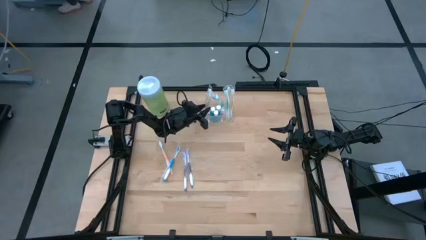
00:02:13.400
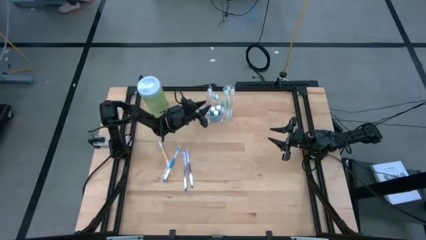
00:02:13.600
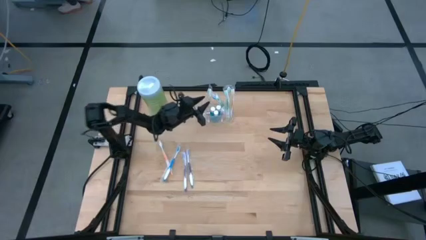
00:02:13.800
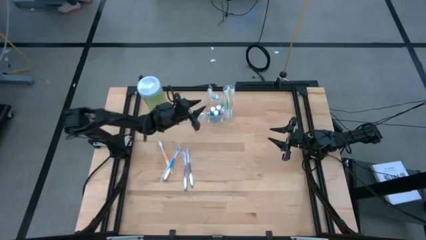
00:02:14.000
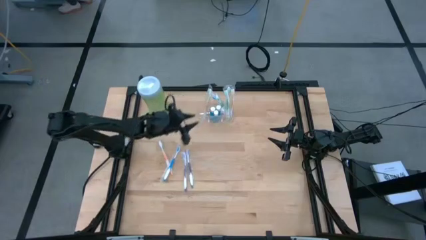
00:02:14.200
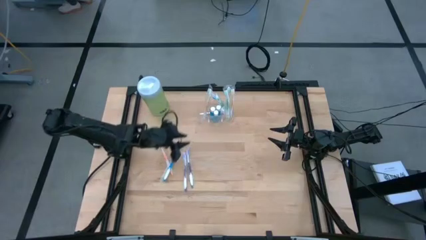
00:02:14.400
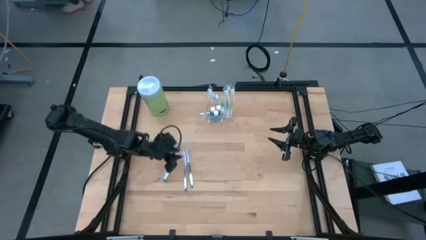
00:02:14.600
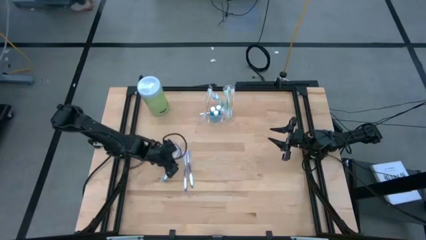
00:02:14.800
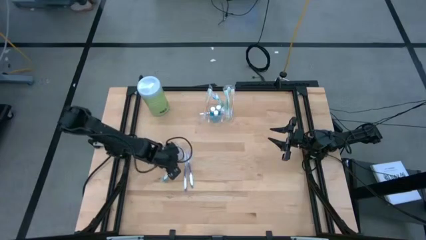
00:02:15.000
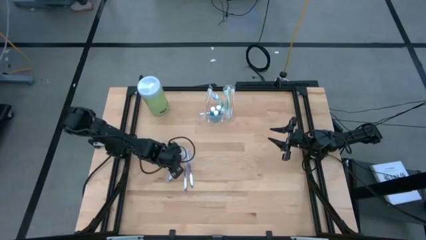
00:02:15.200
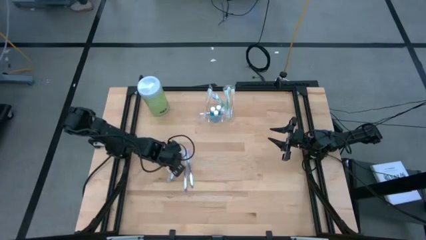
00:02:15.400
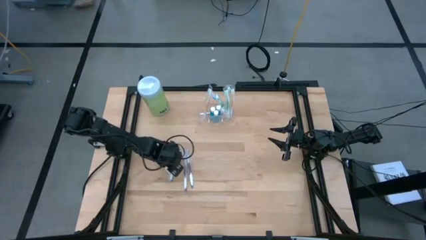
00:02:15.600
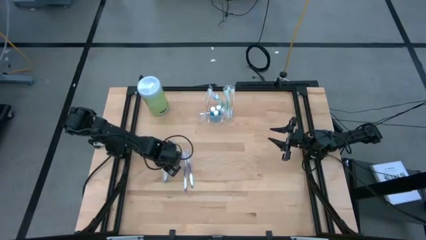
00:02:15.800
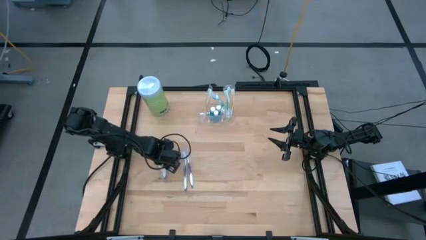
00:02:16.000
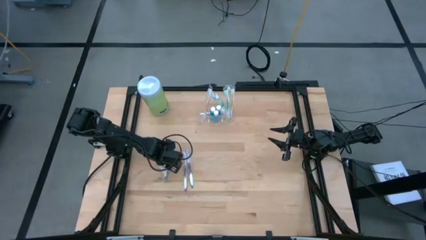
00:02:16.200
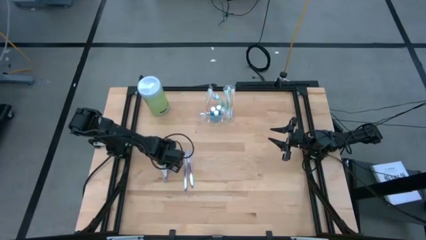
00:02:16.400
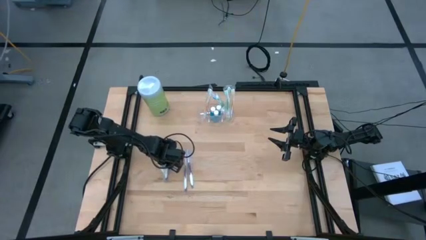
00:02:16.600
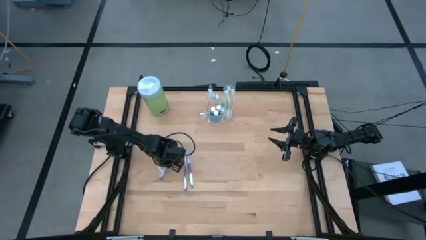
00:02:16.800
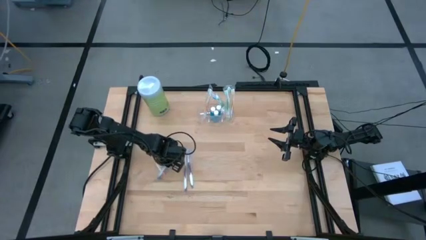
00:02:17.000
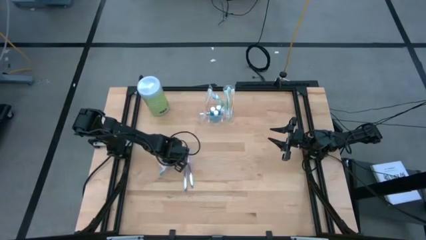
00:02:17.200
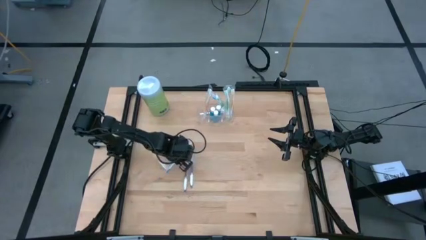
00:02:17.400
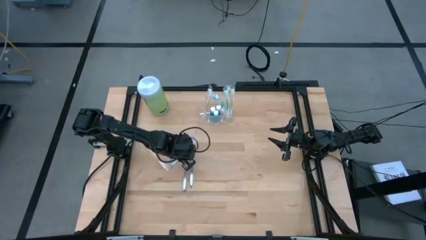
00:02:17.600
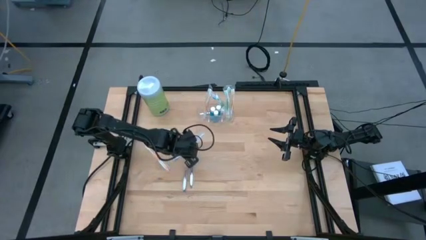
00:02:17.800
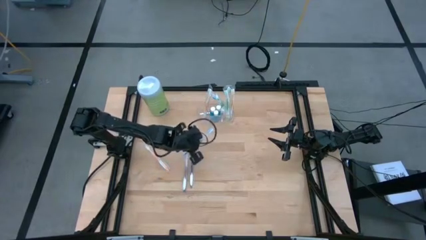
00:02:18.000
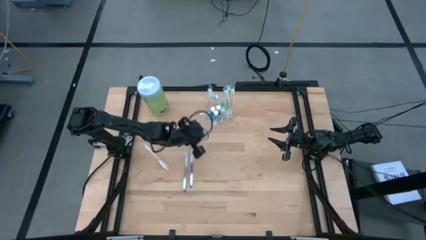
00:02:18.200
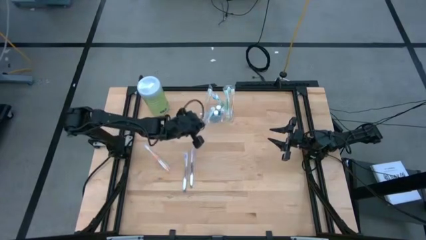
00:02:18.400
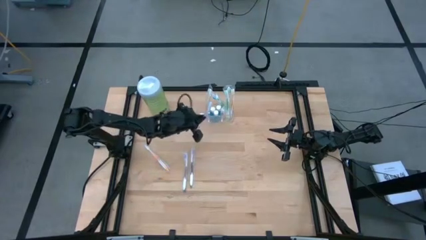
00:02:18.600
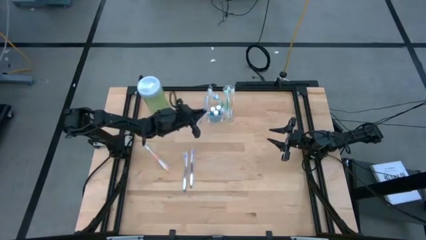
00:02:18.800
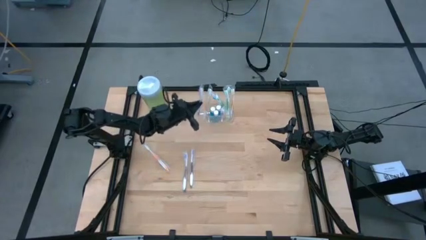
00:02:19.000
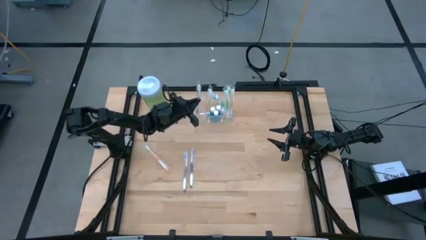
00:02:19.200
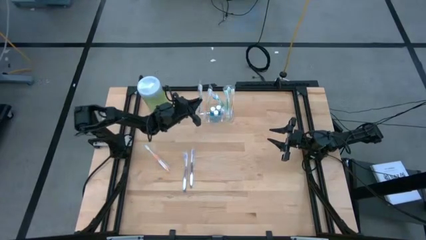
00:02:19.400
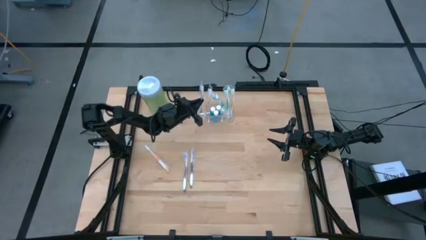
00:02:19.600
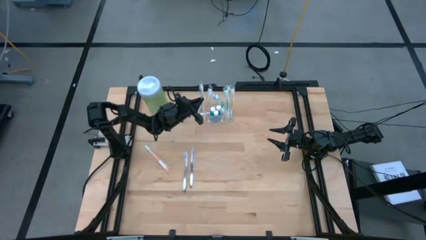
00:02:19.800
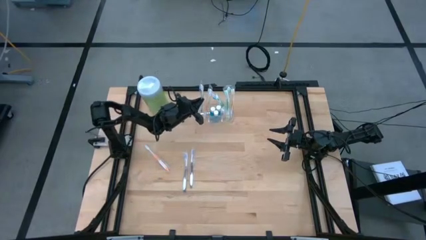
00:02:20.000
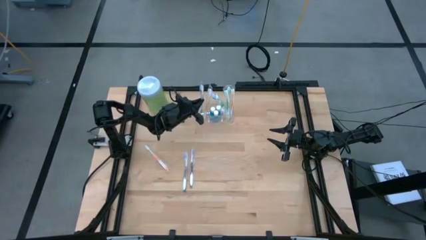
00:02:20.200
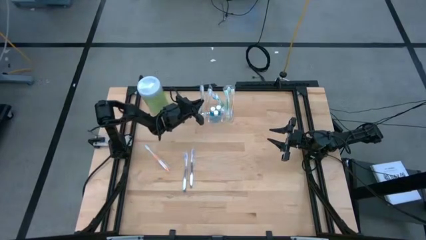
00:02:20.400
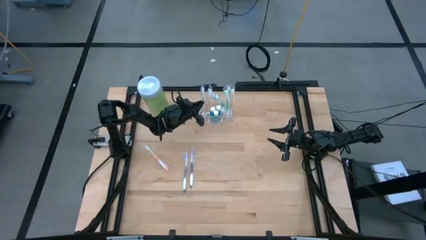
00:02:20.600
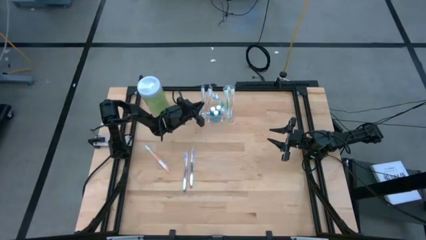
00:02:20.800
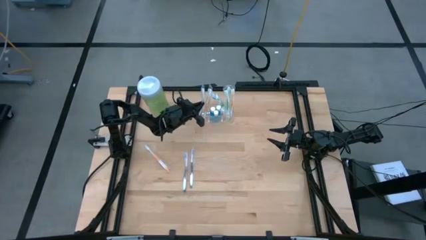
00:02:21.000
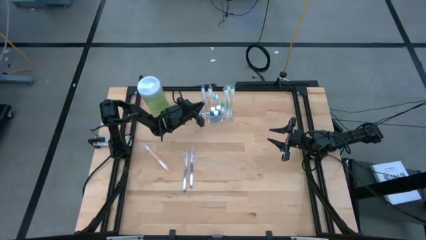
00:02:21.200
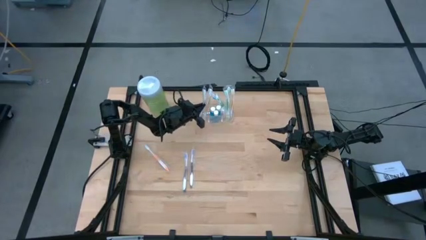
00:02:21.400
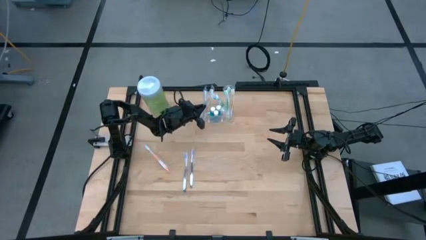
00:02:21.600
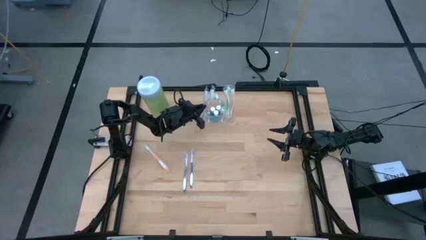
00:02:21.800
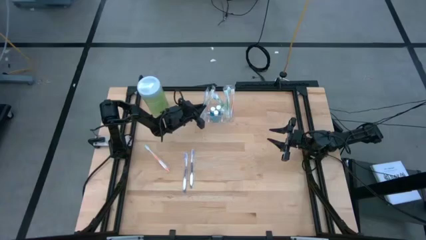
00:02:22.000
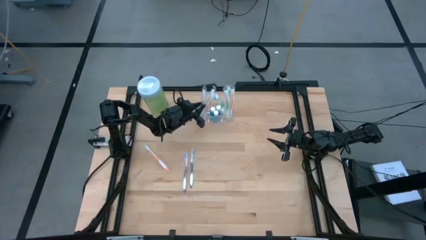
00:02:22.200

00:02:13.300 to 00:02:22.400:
Task: Pick & Place toothbrushing station
Put the blue toothbrush into the transparent organizer

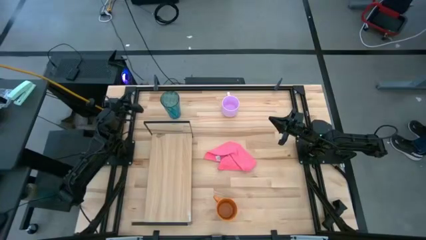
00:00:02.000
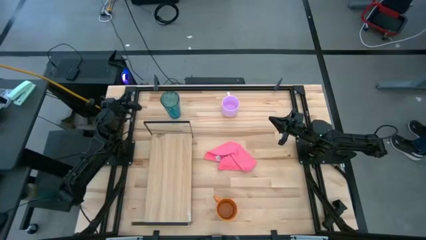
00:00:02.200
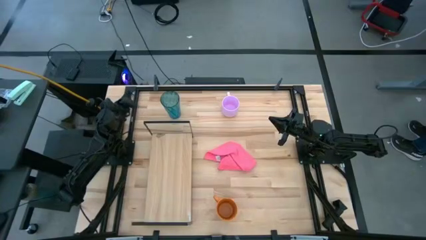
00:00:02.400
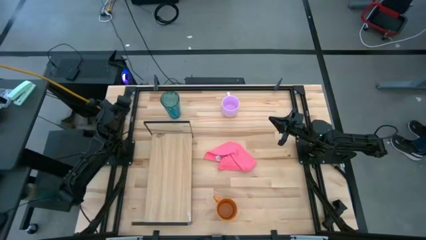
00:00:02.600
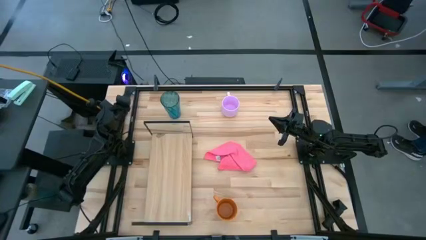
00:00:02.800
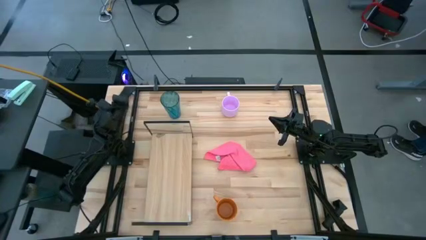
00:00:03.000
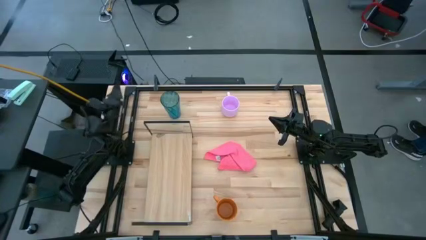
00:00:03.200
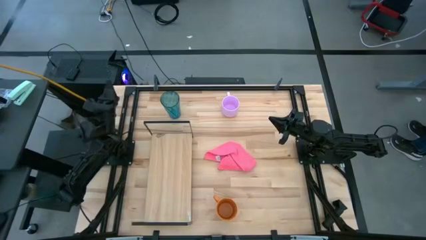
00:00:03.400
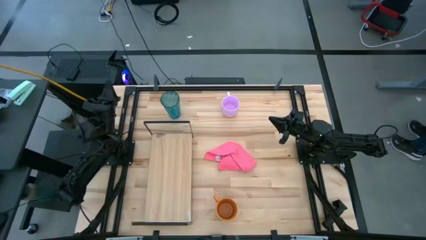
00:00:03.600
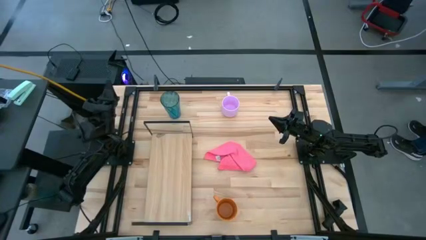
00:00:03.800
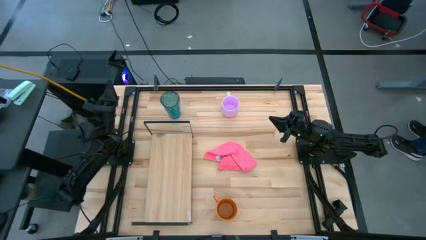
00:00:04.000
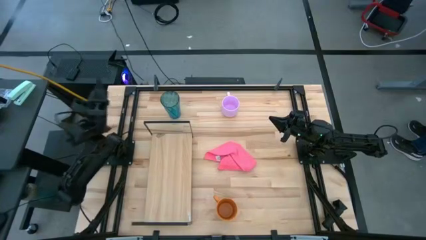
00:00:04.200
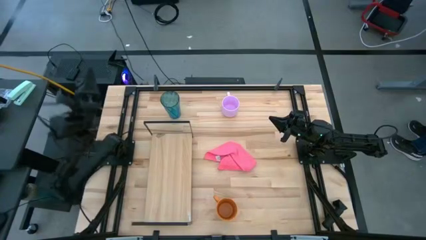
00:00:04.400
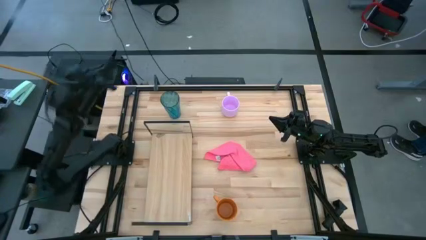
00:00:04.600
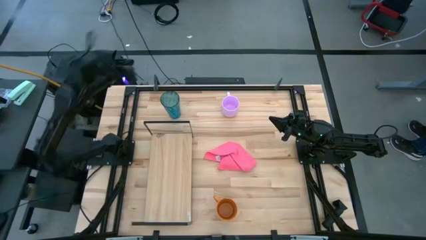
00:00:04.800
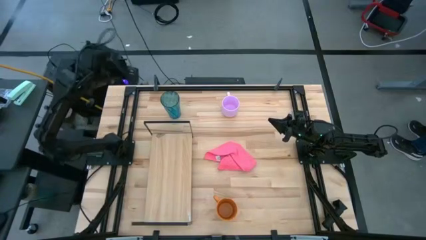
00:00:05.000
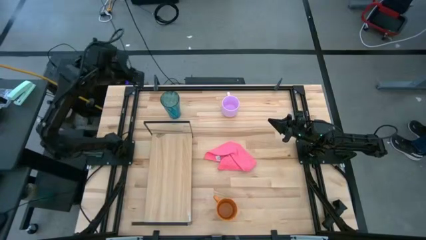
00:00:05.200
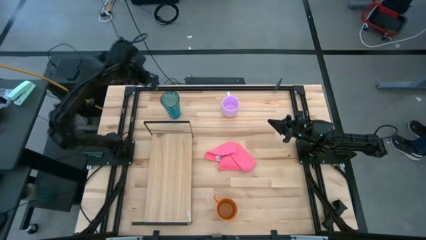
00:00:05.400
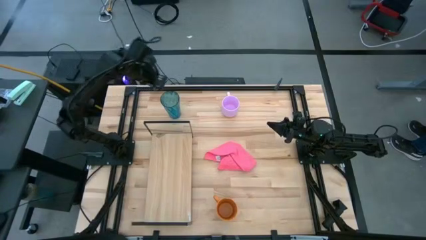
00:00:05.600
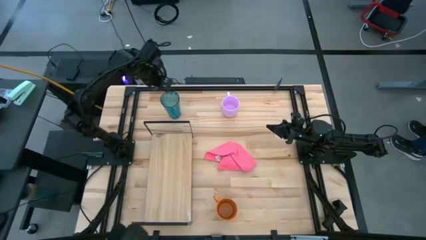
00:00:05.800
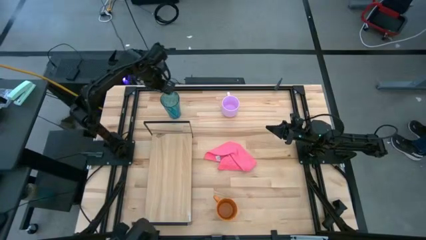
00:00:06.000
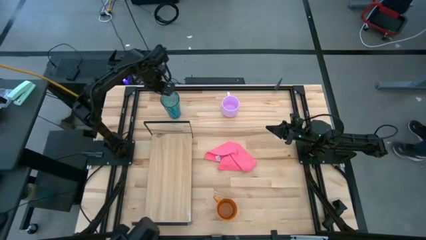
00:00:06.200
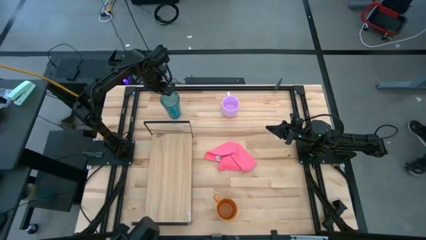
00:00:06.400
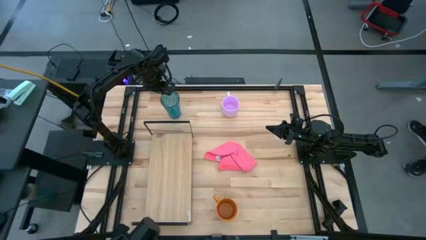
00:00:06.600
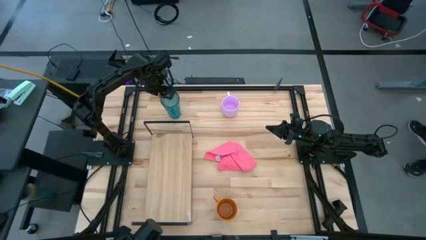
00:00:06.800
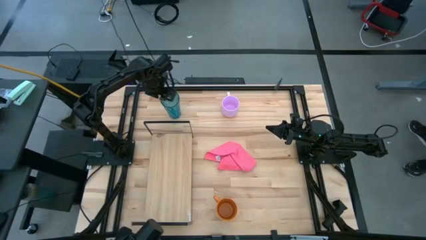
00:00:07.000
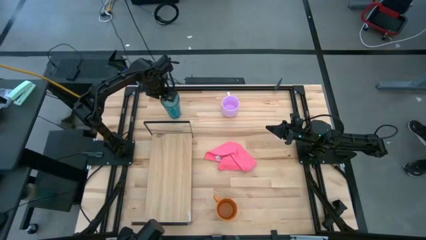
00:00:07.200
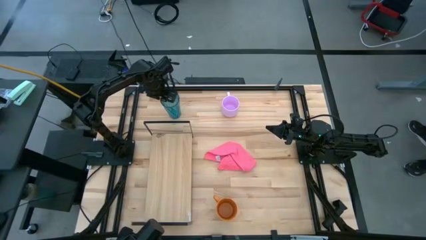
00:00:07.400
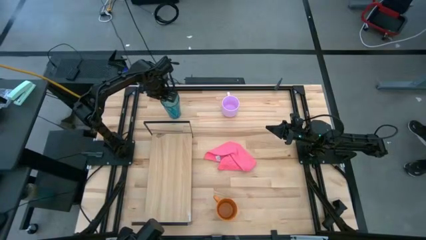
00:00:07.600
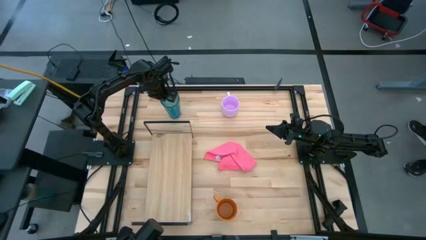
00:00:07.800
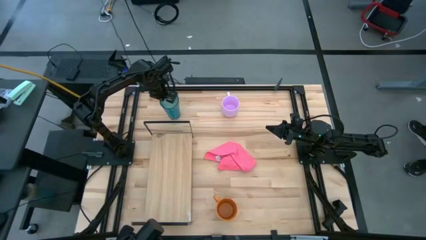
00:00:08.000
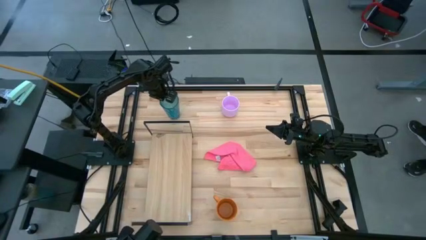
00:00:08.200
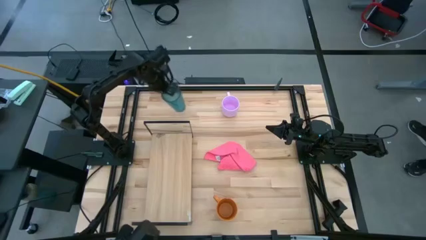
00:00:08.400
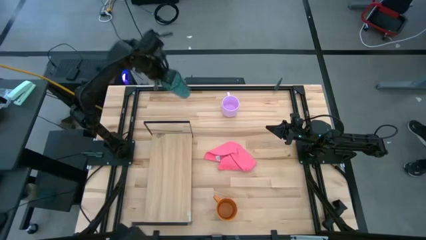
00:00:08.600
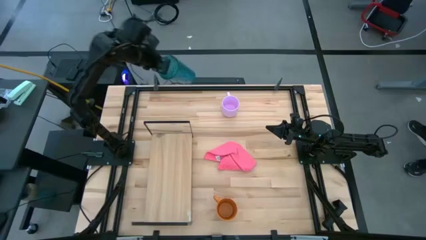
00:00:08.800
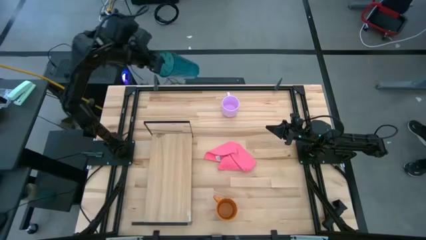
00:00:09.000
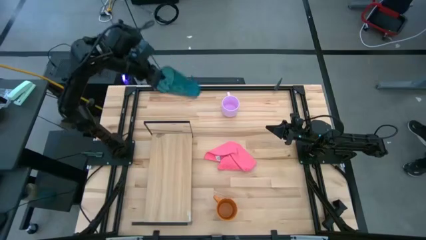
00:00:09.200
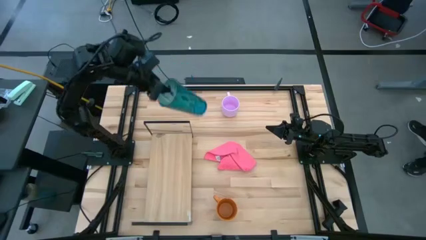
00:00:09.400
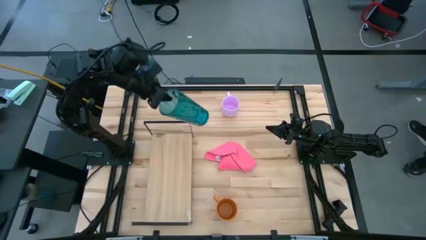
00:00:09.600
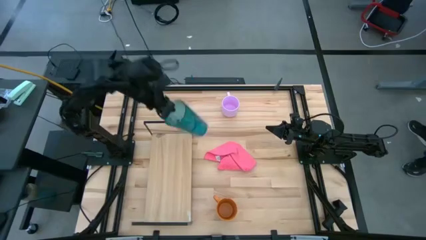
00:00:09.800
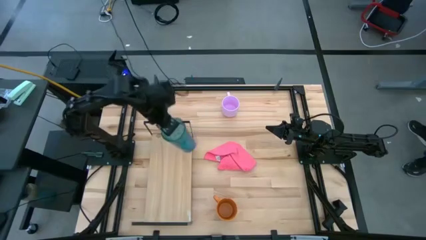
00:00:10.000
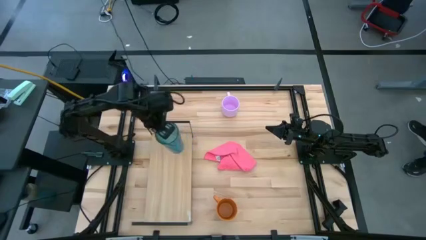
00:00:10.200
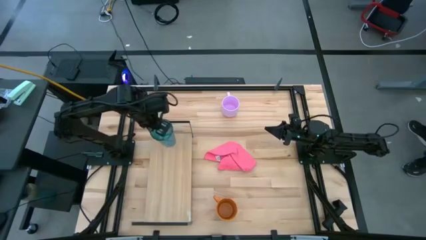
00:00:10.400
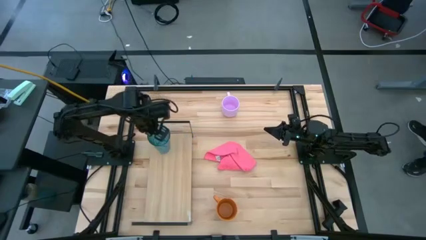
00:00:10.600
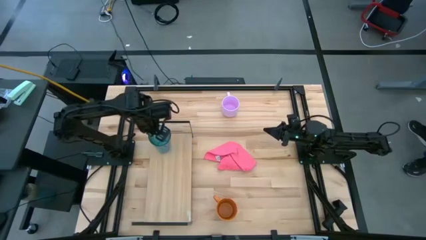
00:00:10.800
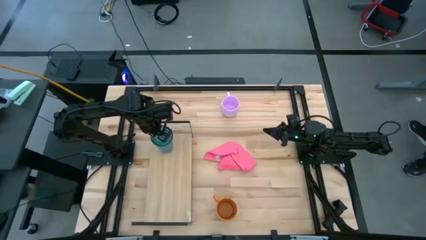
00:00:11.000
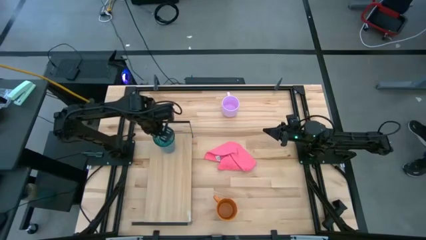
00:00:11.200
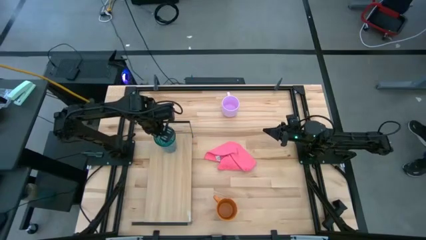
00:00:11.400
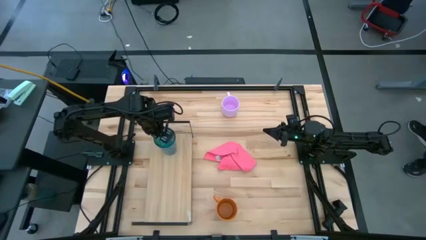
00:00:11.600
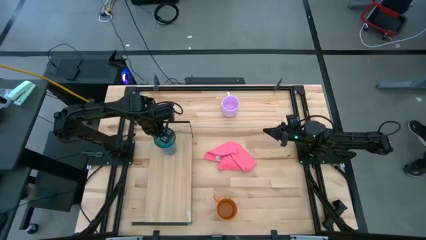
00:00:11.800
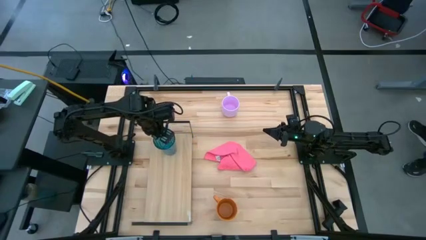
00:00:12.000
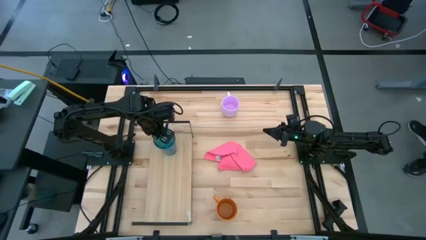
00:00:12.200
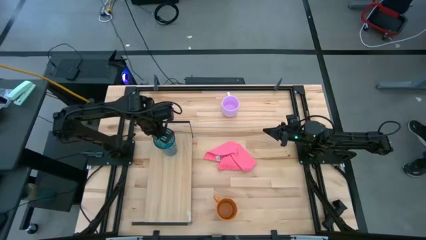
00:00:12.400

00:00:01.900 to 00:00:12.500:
Task: Stack small to large cups/mugs on shelf
Put the blue cup on the shelf
